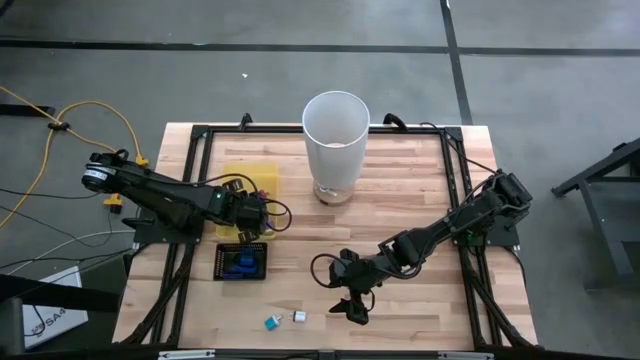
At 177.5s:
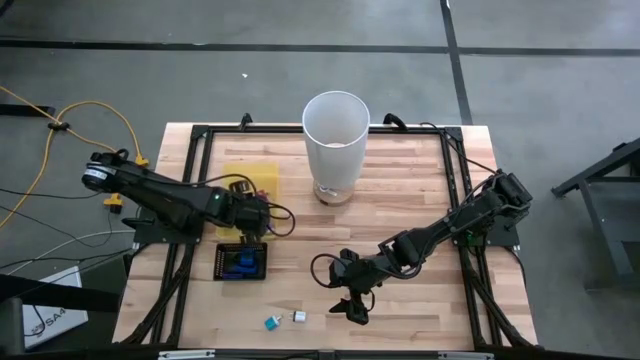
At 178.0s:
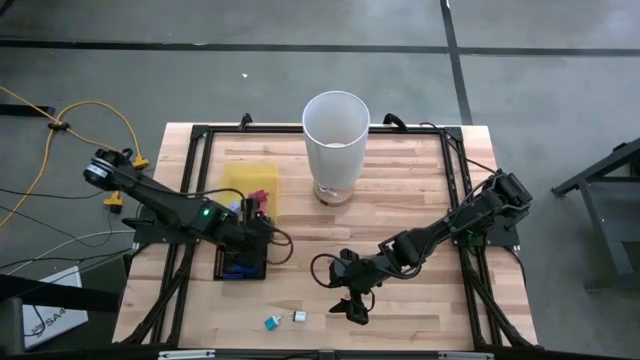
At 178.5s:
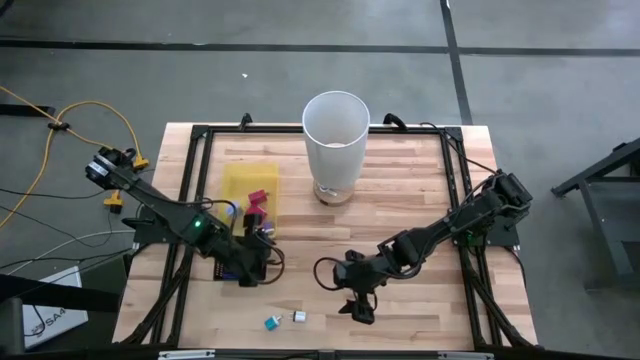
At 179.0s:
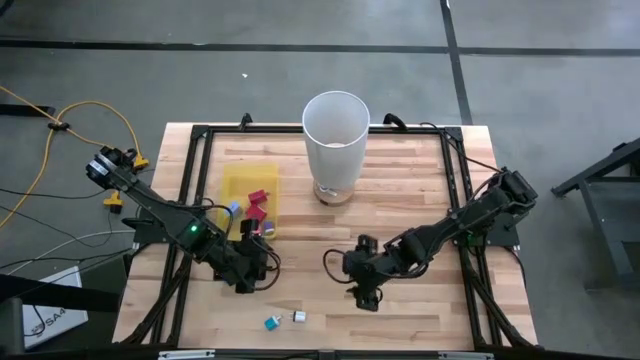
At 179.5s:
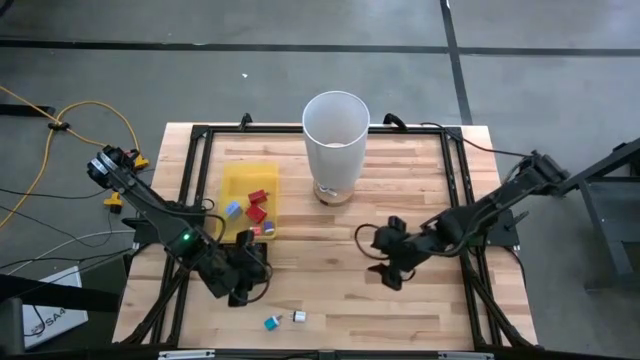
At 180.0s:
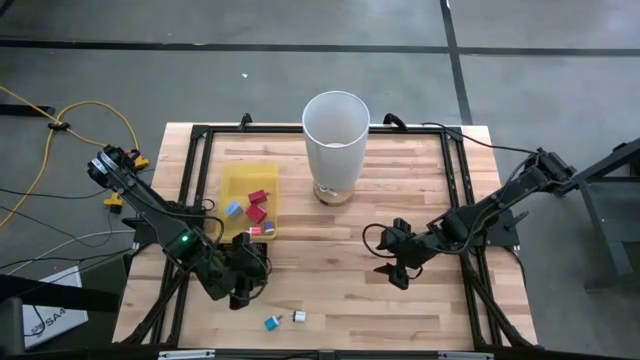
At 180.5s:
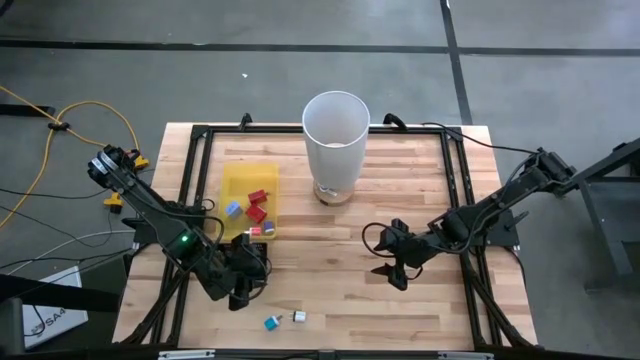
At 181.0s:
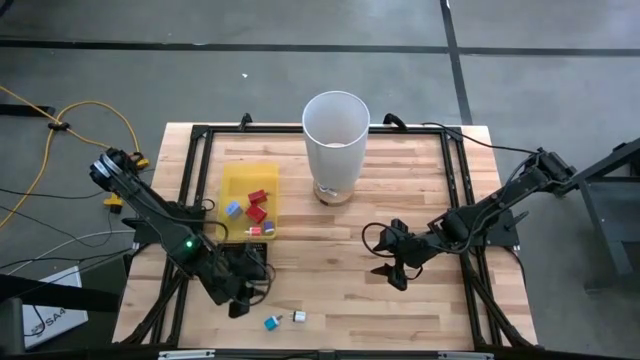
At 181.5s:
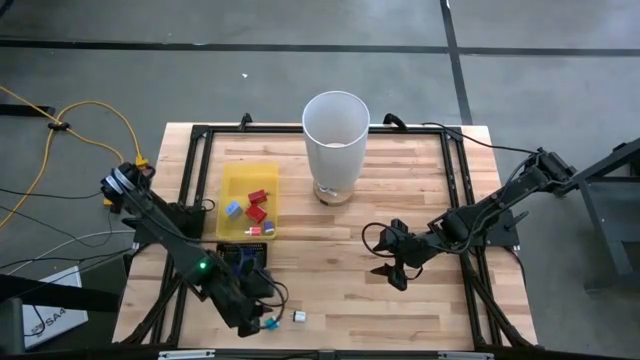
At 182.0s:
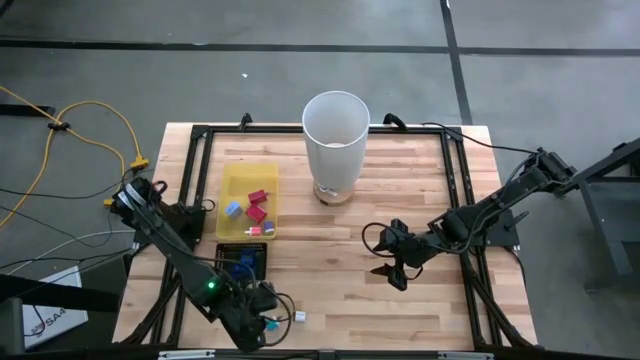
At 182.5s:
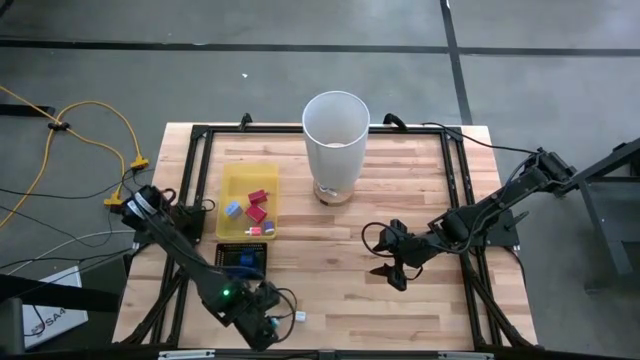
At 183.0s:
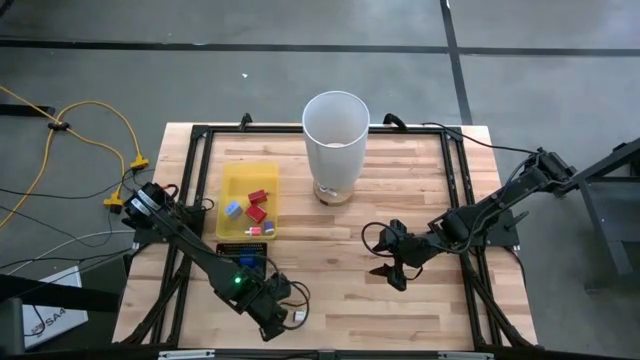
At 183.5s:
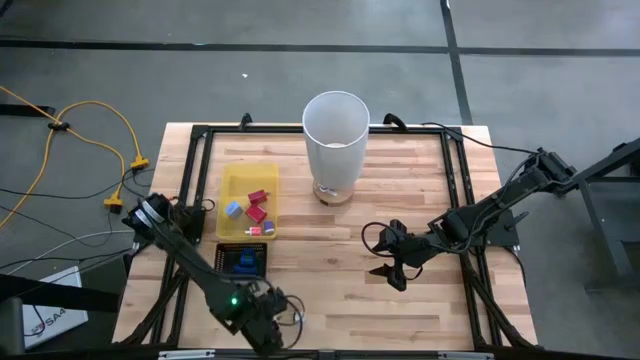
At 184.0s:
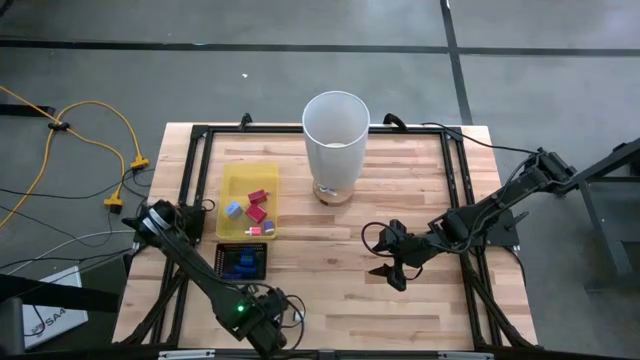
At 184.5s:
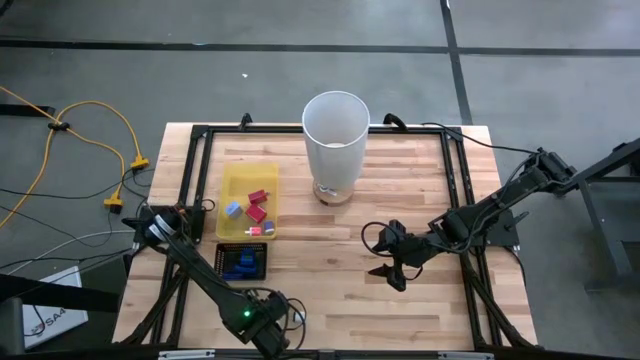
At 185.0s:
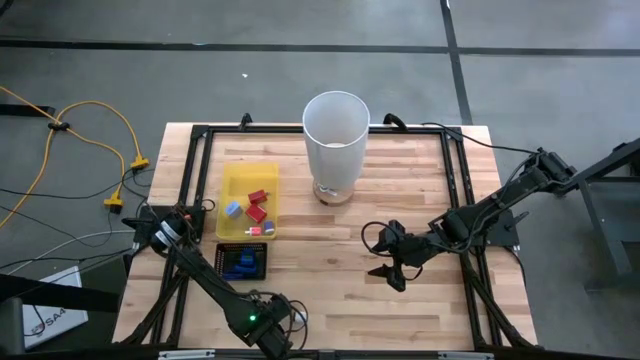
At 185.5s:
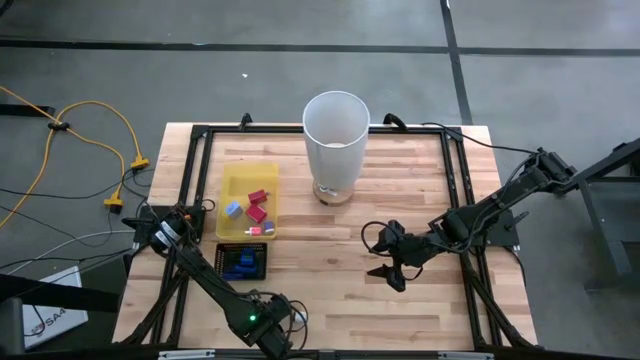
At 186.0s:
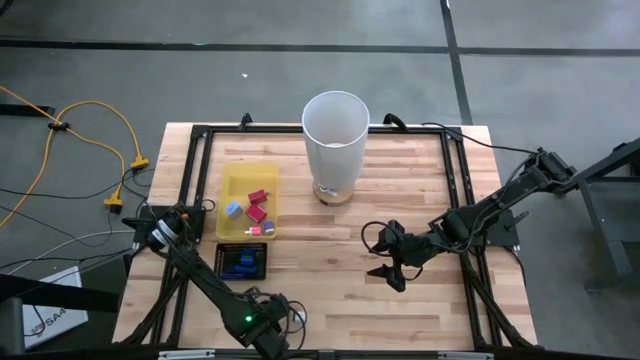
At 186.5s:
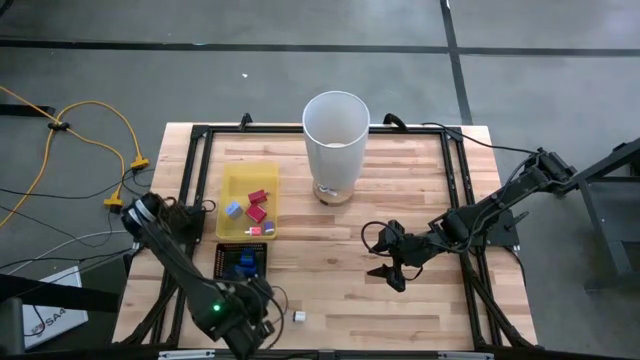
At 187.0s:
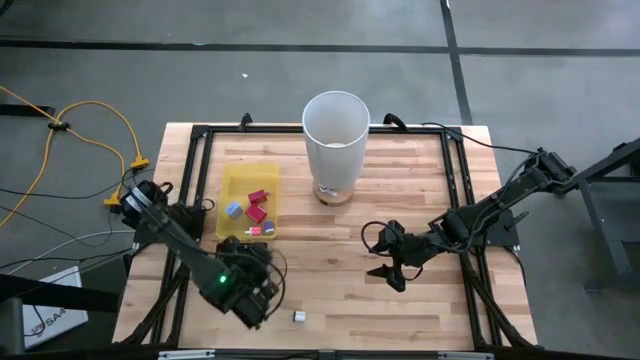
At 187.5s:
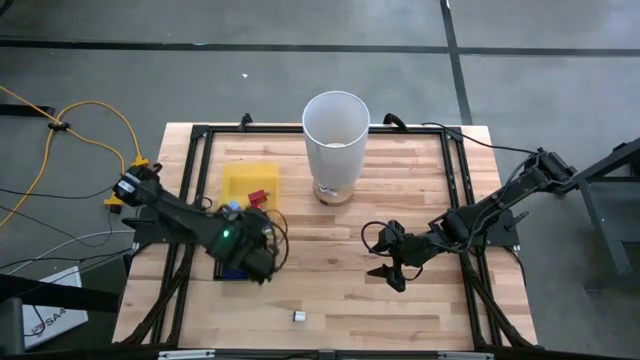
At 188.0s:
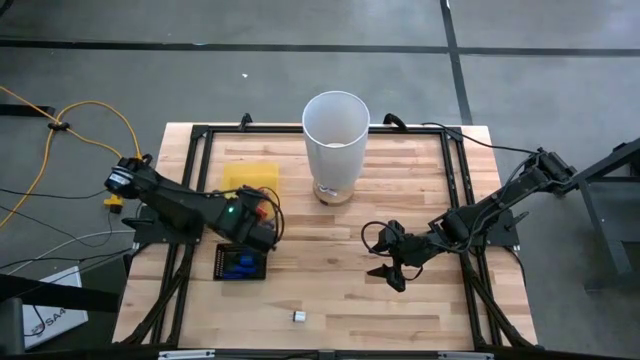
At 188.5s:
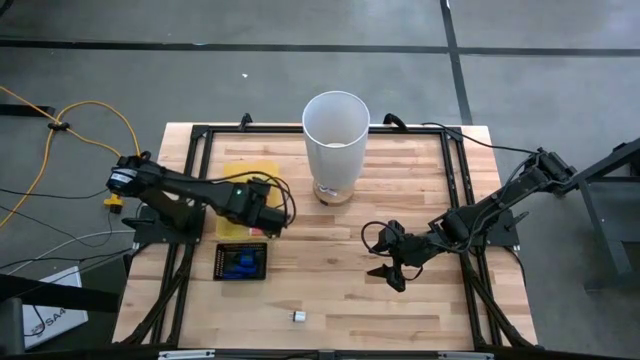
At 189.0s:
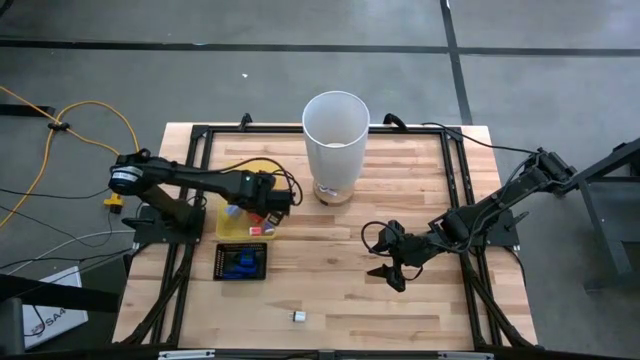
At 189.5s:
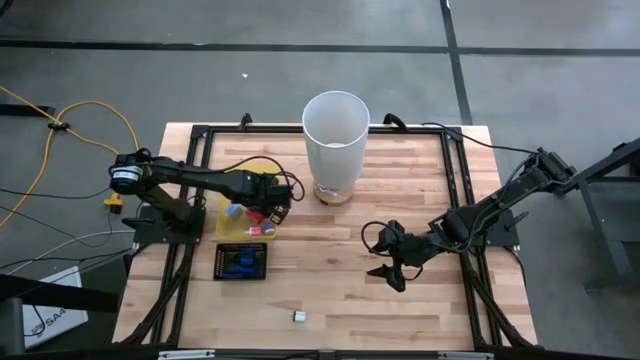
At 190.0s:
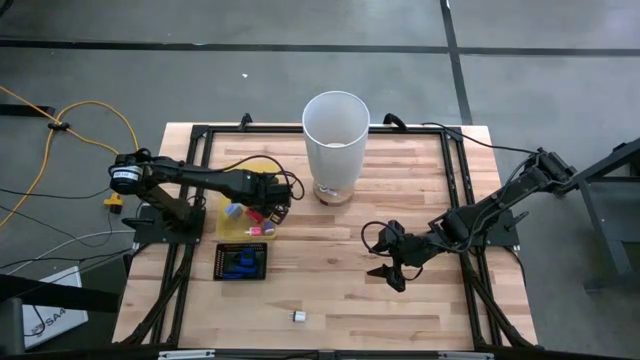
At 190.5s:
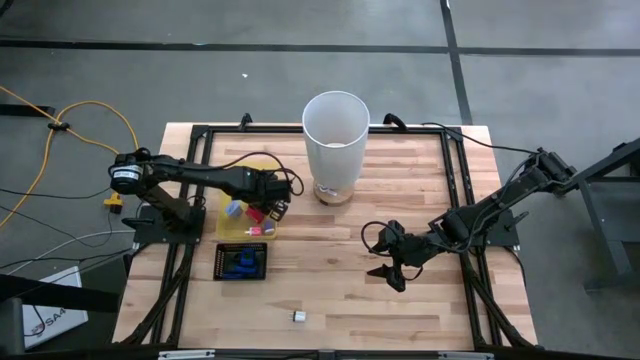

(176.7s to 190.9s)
Task: Pick & Place Office items
Put the blue charger adapter into the yellow bin

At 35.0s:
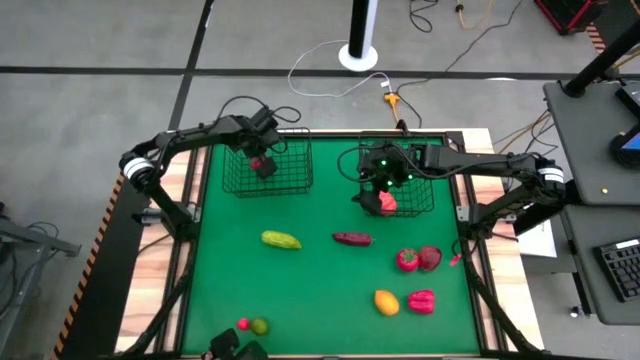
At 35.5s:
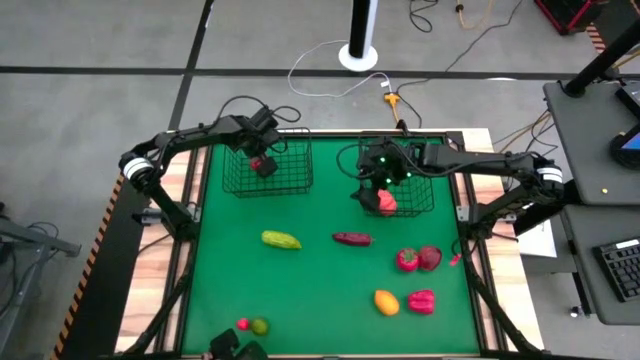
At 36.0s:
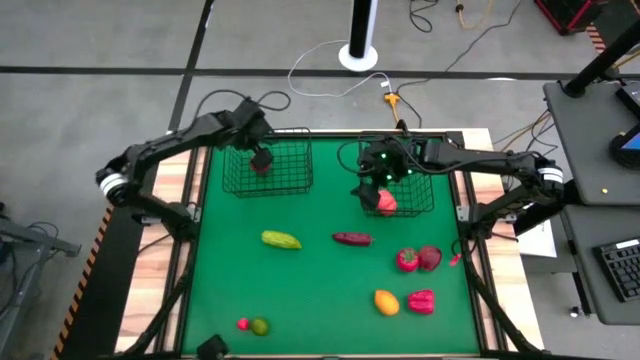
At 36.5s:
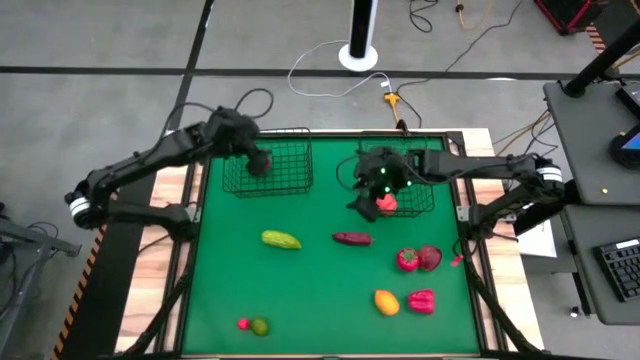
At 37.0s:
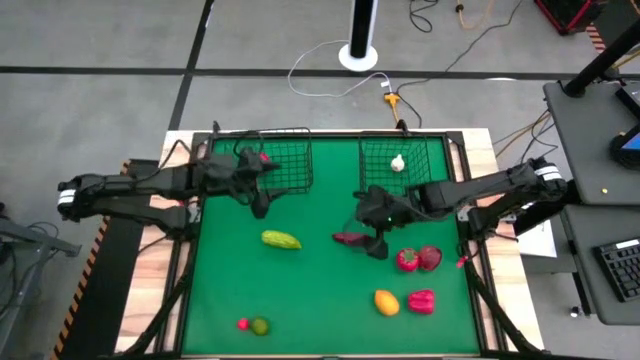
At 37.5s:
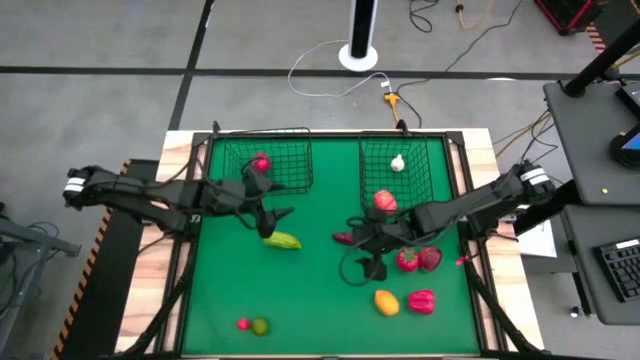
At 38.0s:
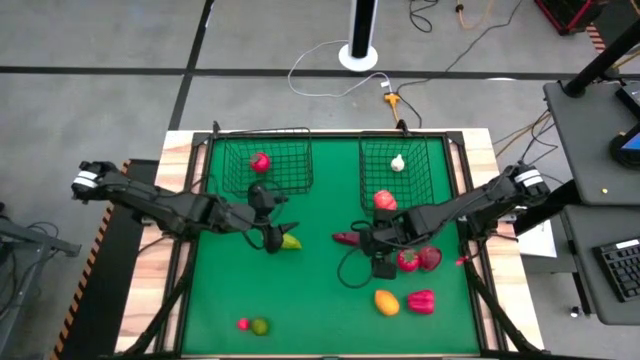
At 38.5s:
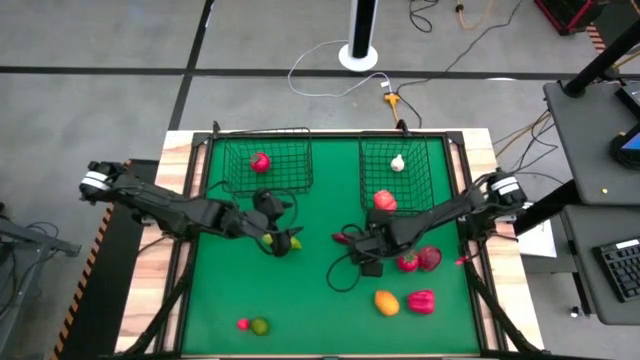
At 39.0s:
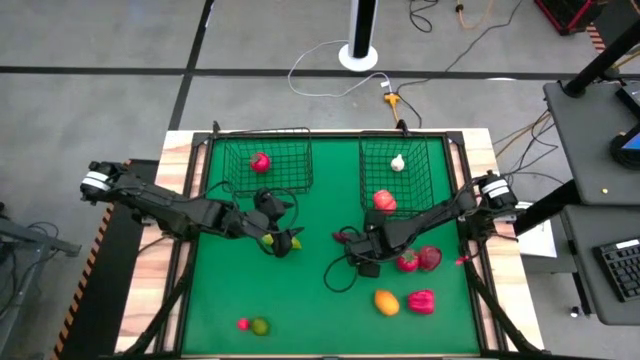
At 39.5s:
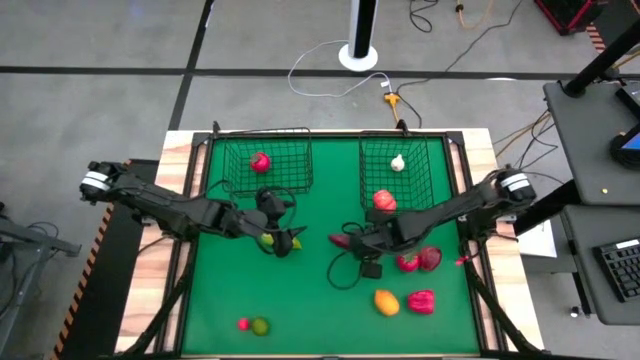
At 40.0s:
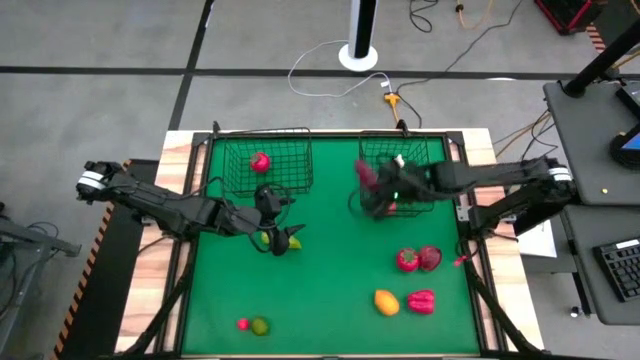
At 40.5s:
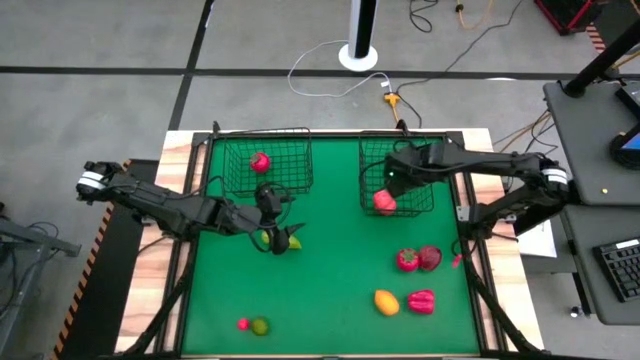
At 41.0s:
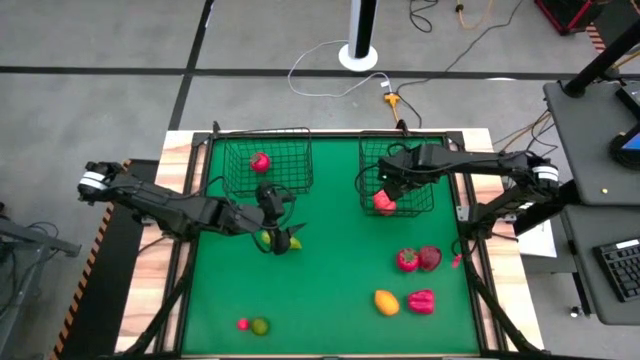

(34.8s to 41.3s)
Task: Sort produce into baskets
Put the dark red chili pepper into the right wire basket

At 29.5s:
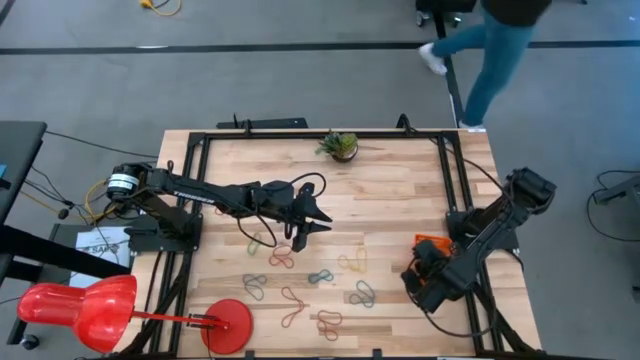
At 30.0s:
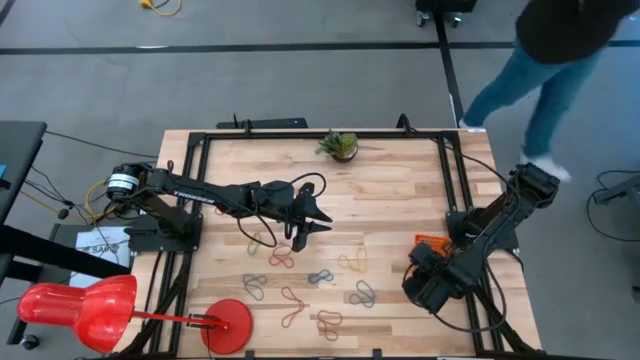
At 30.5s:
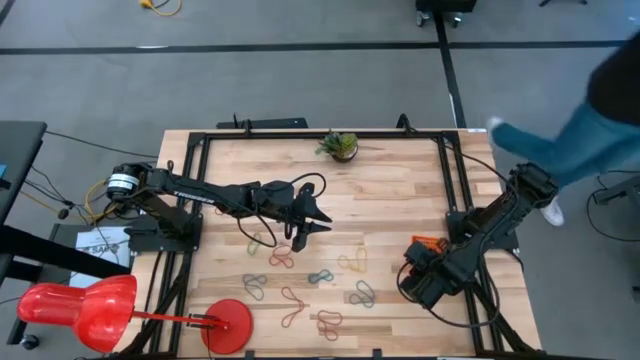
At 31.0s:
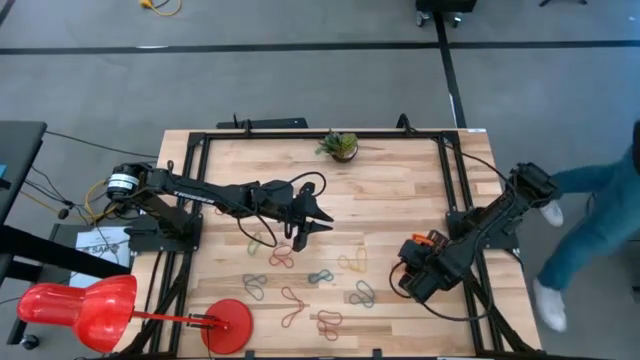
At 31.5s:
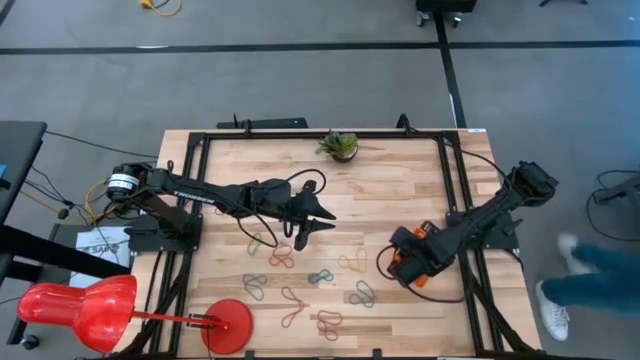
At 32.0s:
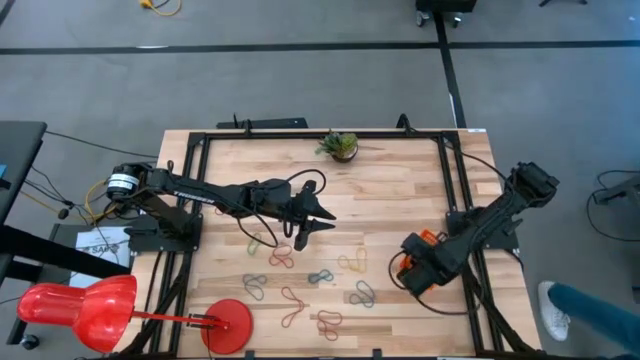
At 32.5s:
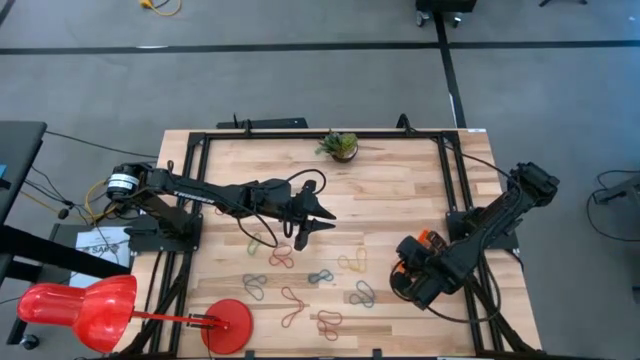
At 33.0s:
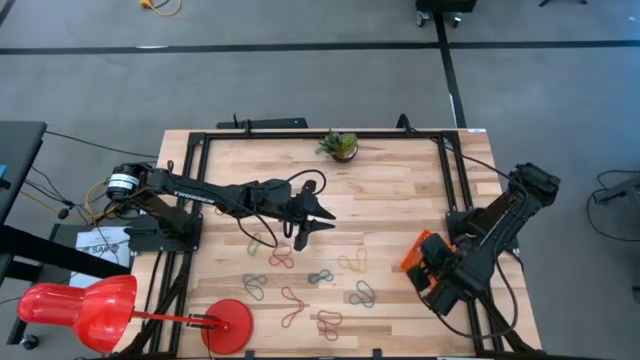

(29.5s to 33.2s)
Task: Pick and place rubber bands into bin
Put the yellow rubber band into the orange basket
